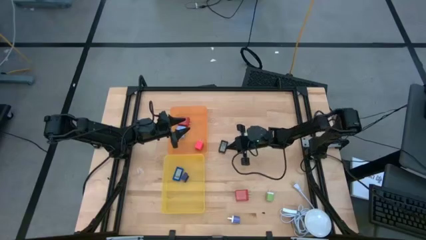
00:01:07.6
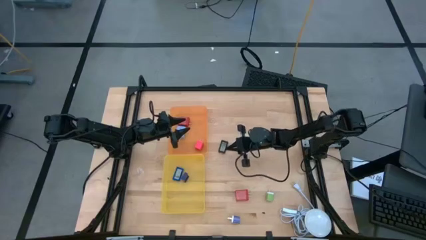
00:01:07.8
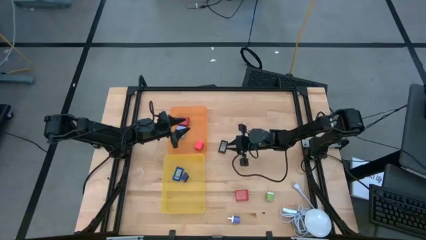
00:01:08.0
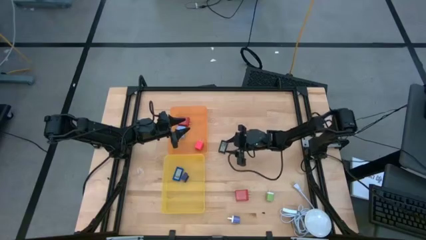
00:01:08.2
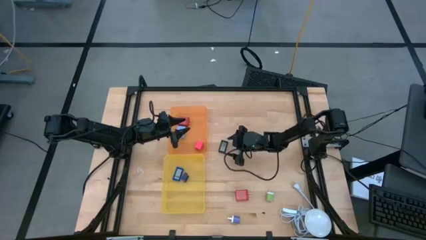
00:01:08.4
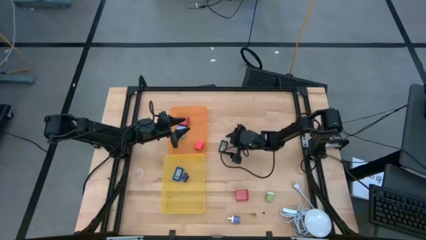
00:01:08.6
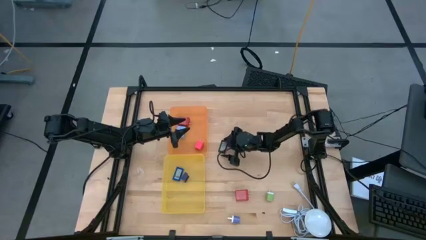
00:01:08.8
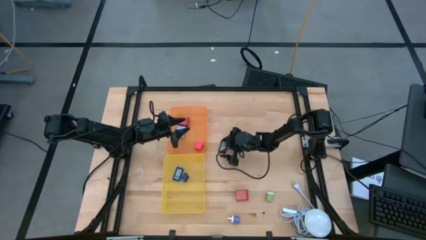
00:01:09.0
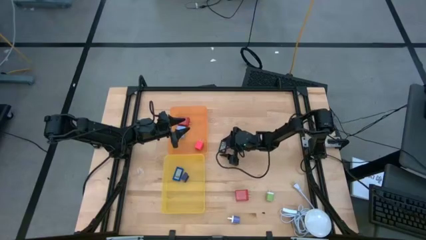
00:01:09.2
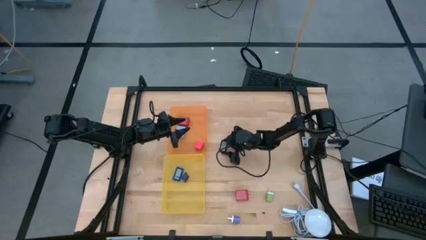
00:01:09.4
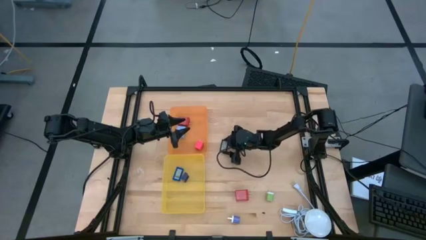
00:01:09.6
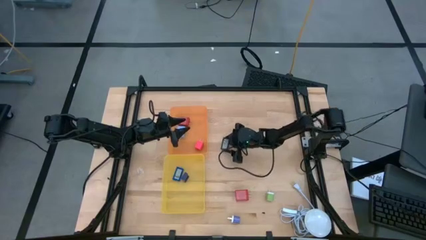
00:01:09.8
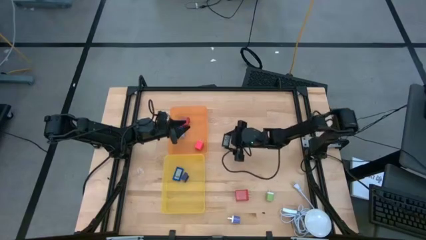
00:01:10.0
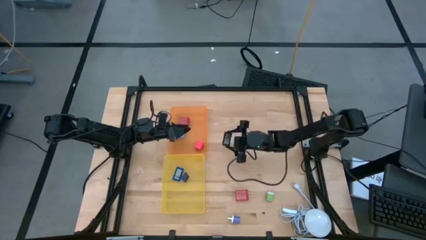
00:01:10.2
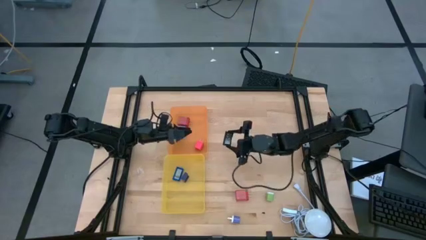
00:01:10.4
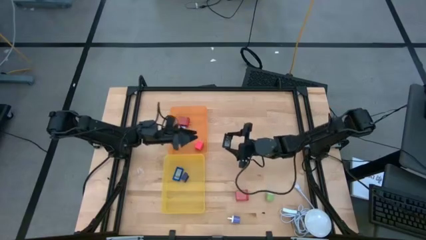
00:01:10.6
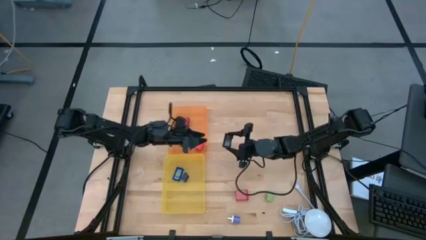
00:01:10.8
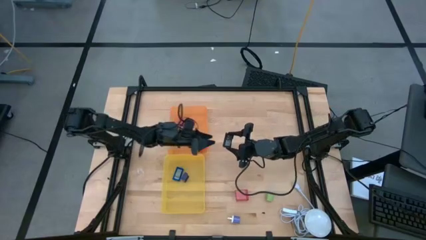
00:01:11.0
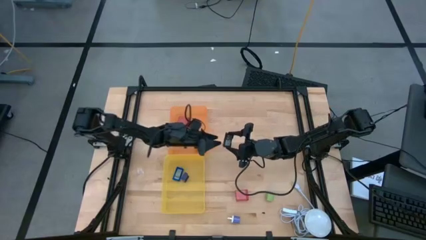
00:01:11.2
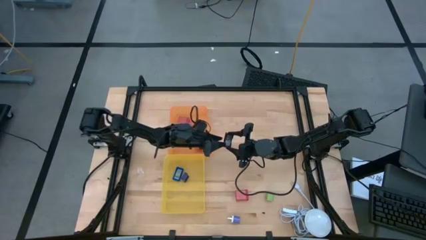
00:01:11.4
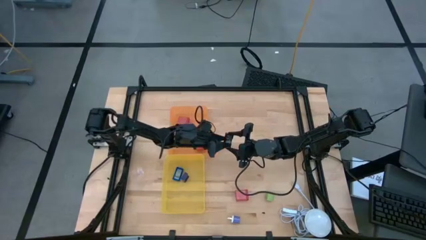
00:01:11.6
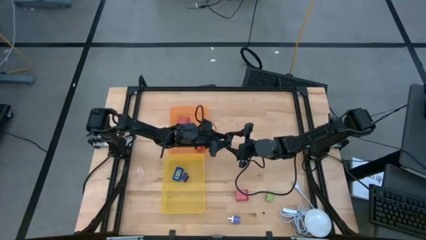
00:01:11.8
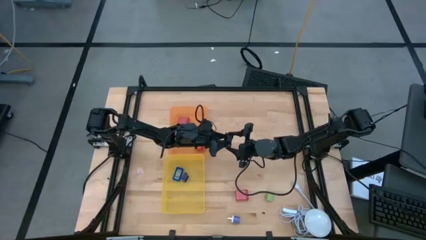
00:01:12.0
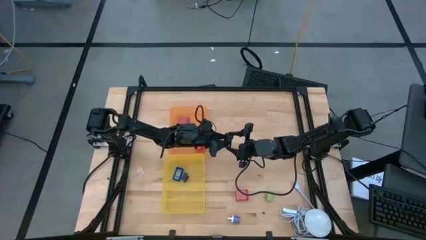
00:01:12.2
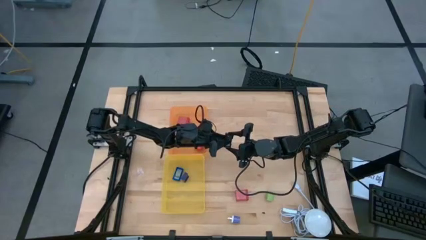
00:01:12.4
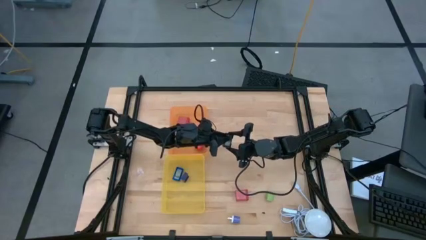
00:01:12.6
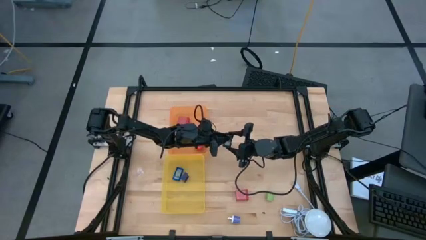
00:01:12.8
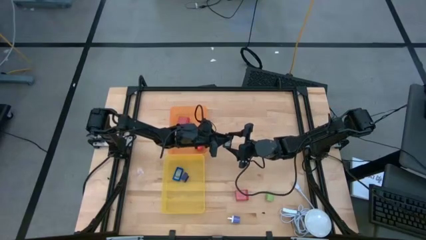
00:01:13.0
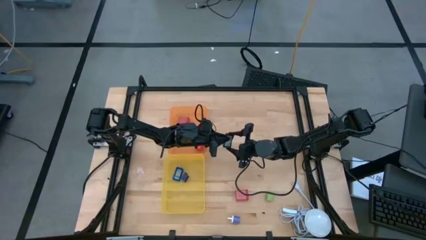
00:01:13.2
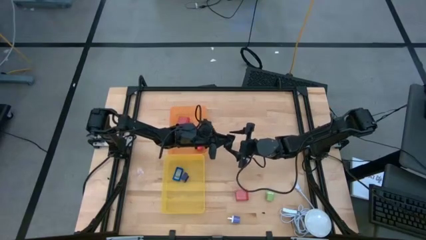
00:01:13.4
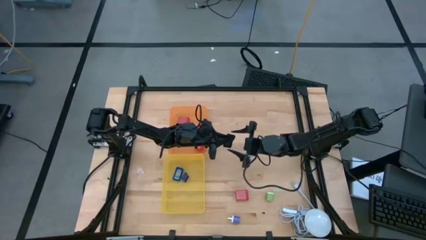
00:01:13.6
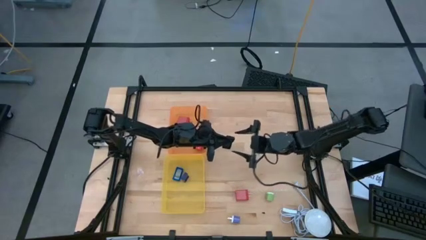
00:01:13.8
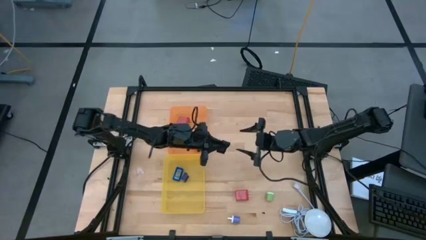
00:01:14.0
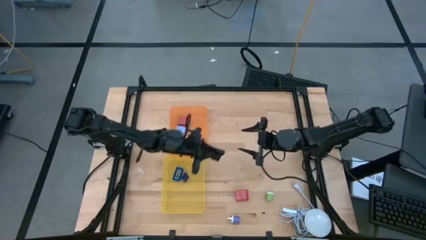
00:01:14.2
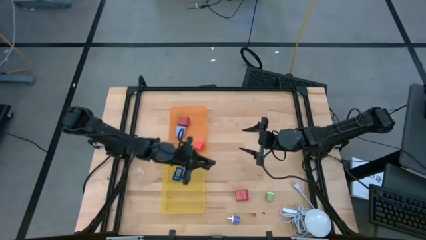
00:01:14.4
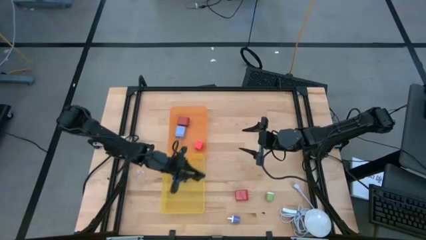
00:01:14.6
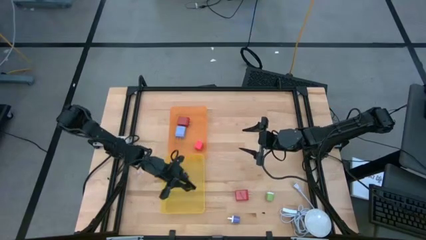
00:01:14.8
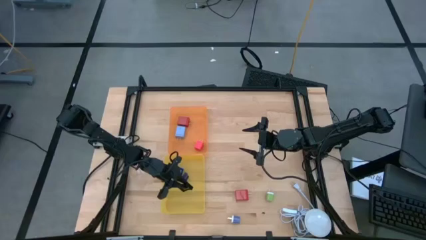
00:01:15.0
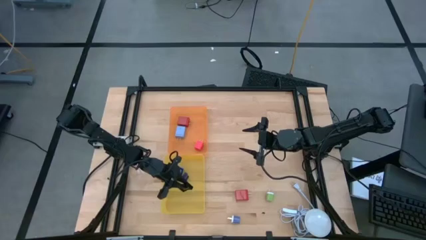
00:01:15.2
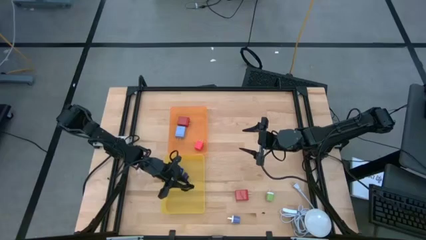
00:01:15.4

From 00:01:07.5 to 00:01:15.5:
Task: Sort adapters and digital timers
Put the black digital timer into the yellow bin

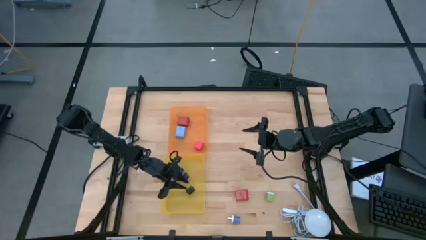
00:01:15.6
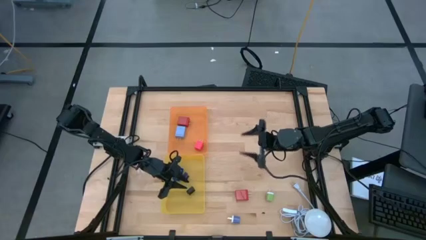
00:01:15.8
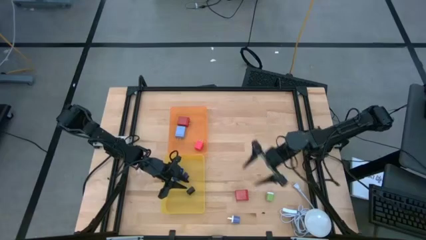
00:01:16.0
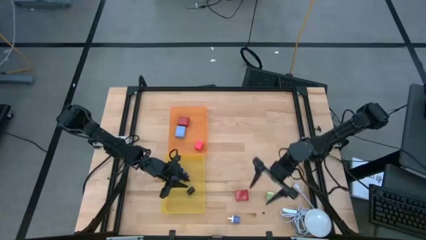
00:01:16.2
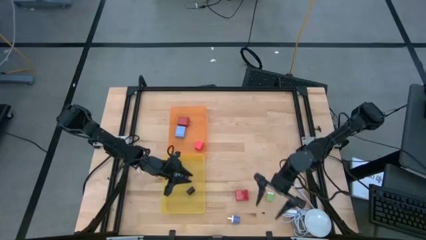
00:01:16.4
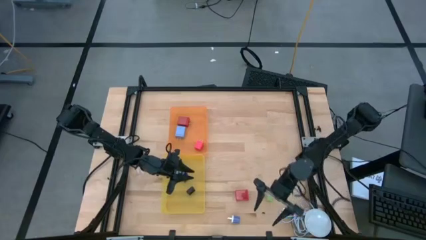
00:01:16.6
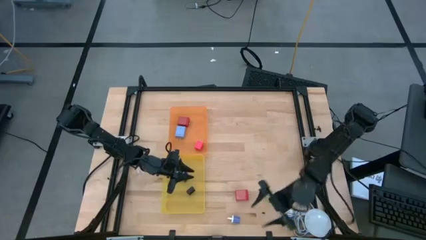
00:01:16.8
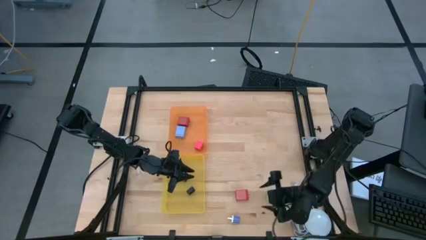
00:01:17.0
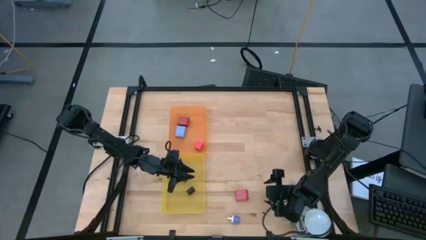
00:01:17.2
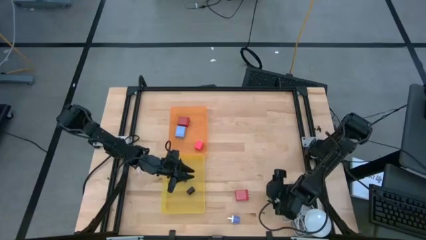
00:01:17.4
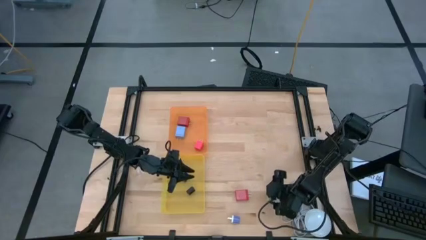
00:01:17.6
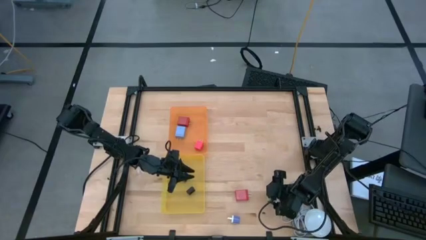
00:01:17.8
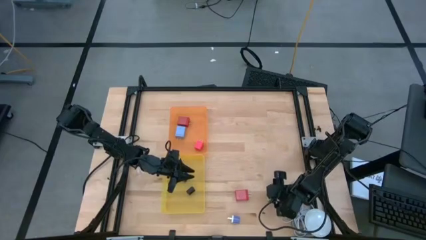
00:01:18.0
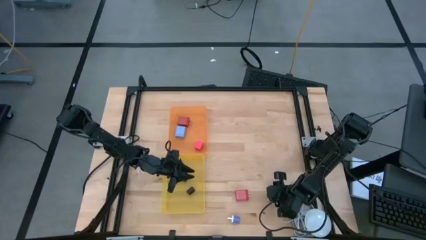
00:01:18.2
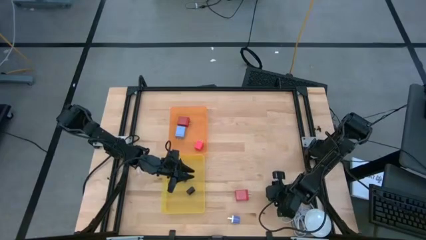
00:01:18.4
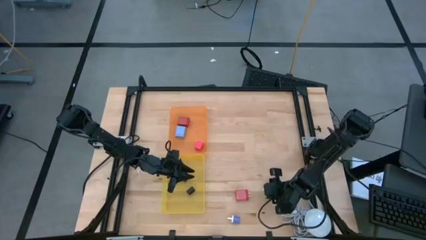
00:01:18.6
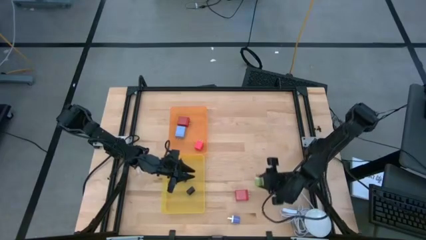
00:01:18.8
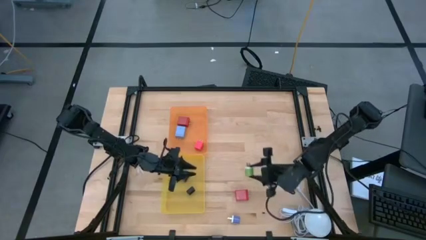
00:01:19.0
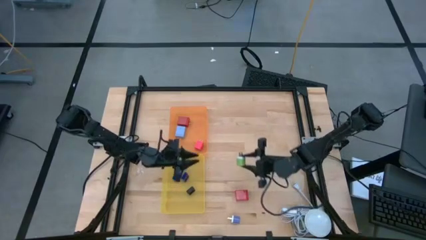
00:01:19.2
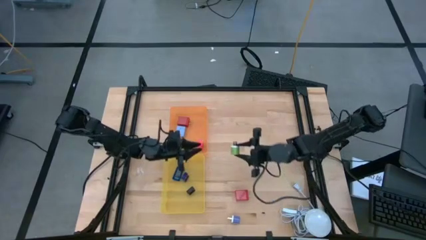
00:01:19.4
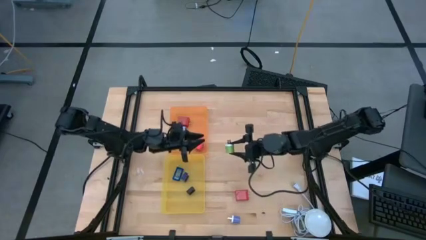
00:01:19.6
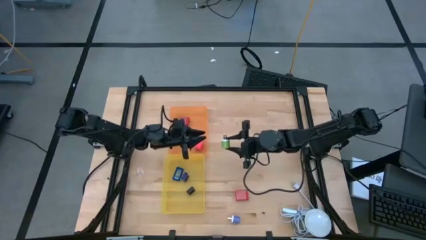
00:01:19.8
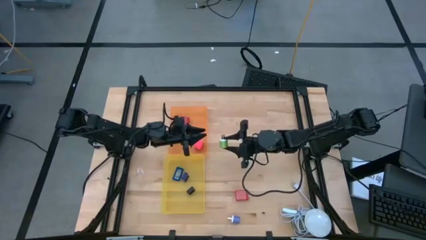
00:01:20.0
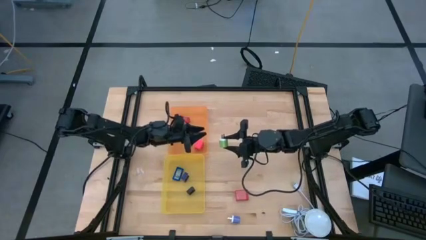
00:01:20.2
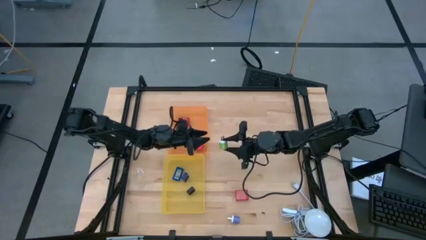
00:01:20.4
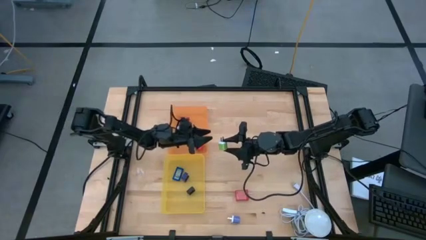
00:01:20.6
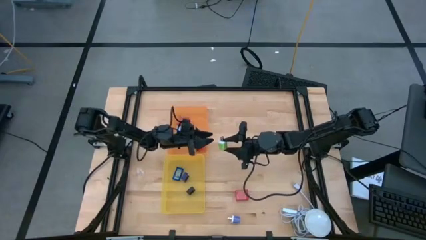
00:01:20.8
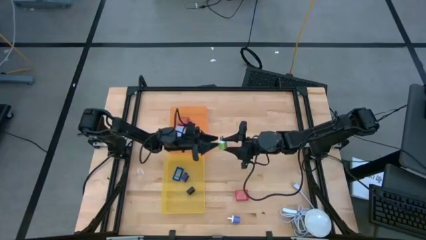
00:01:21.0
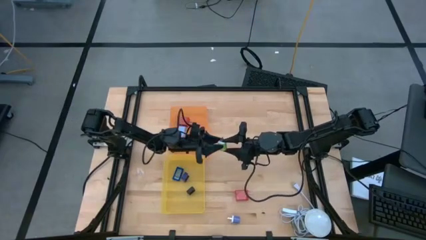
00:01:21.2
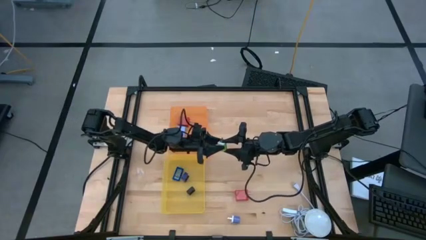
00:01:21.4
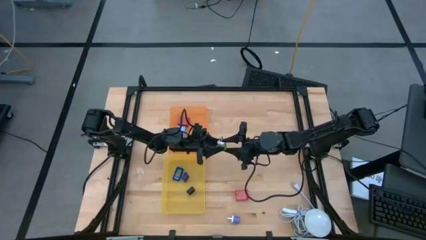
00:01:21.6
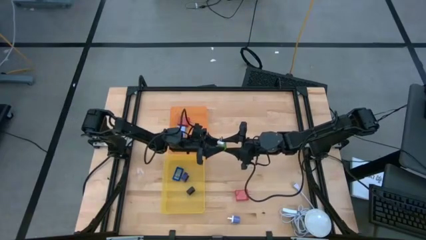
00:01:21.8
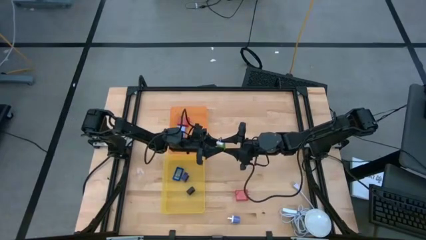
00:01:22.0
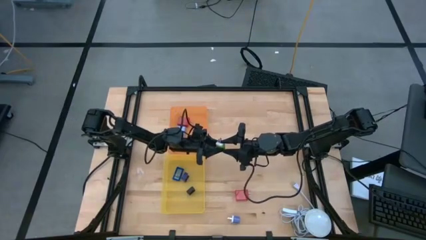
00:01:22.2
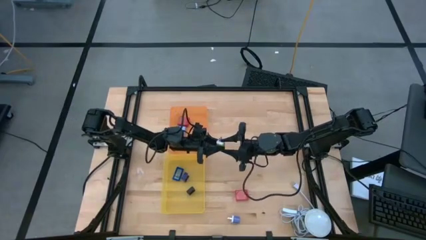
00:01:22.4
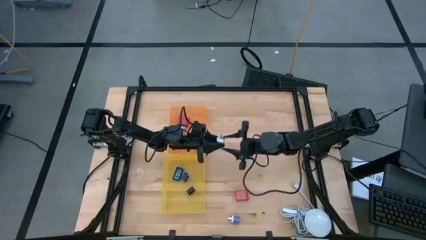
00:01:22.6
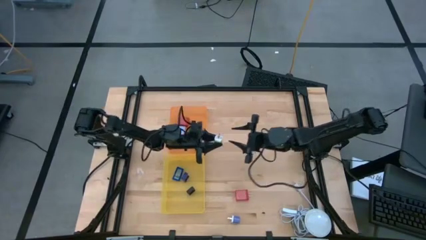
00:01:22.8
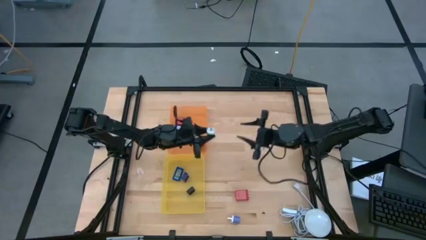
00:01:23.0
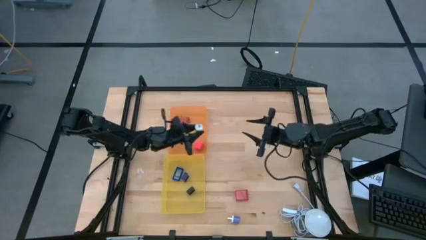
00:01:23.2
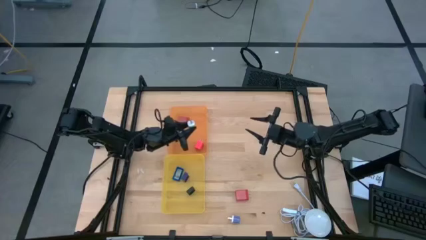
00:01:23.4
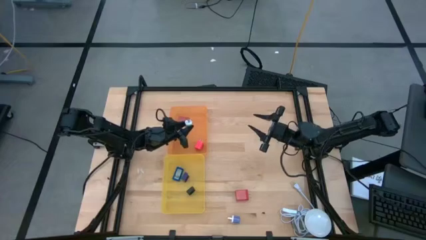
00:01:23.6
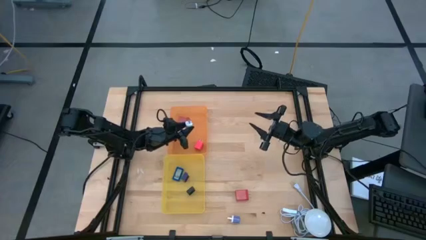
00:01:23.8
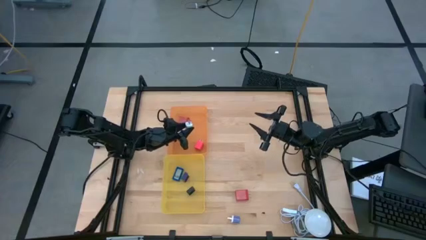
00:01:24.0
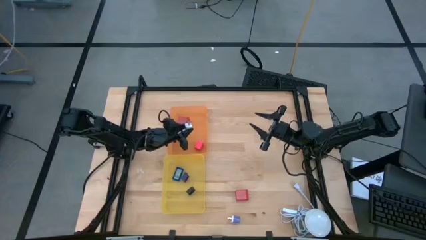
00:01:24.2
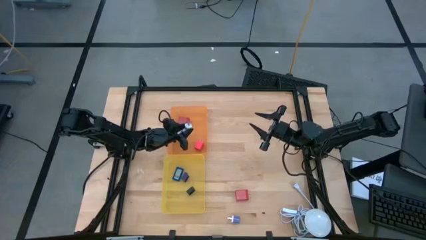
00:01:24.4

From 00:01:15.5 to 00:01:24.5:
Put the green adapter into the orange bin
